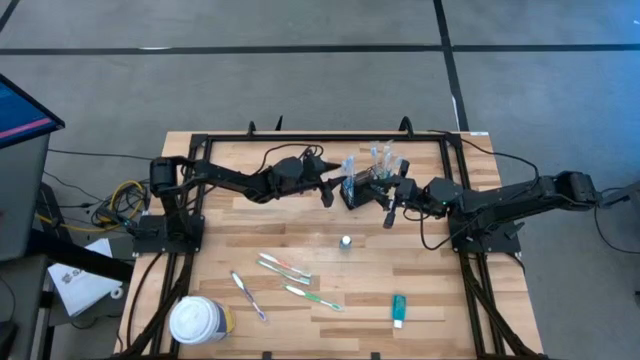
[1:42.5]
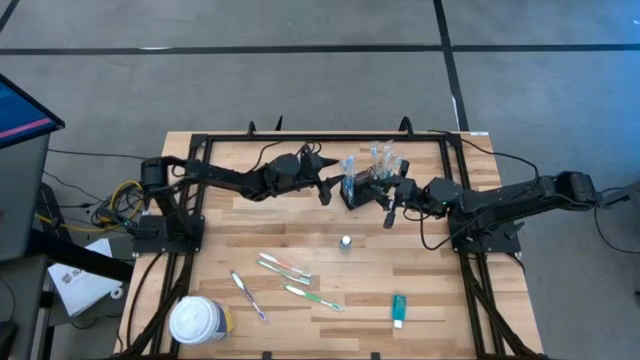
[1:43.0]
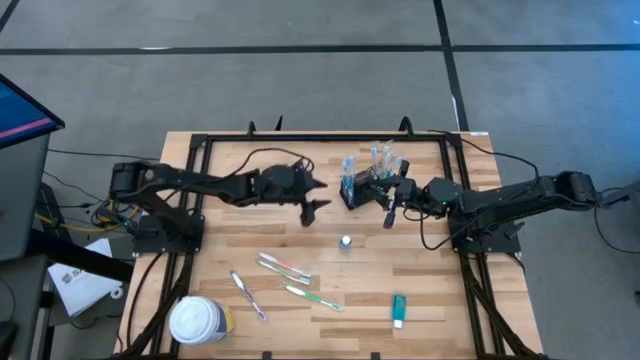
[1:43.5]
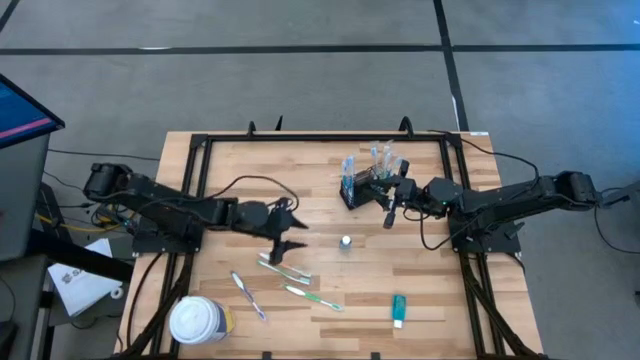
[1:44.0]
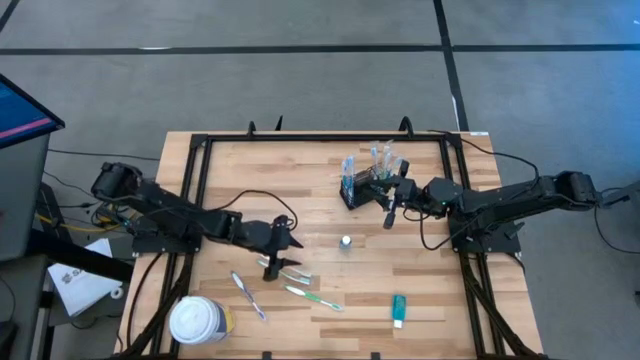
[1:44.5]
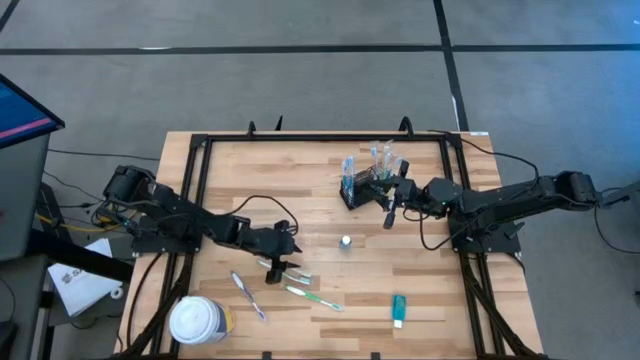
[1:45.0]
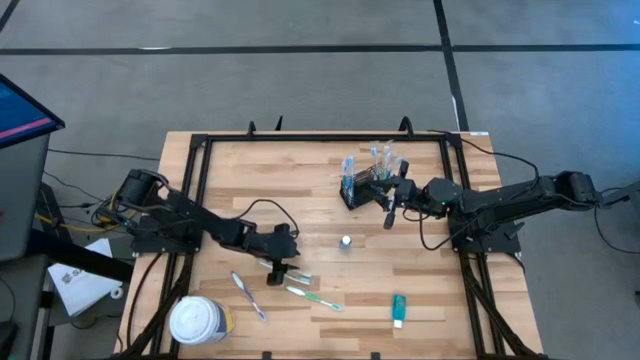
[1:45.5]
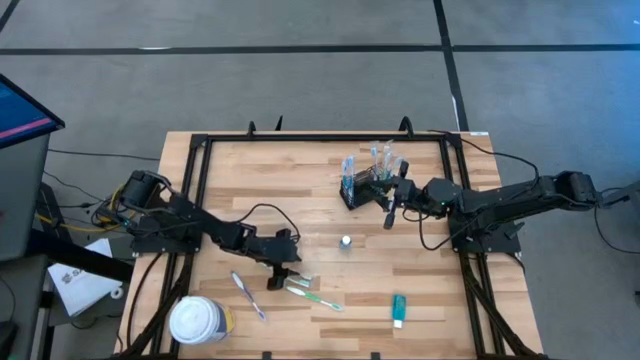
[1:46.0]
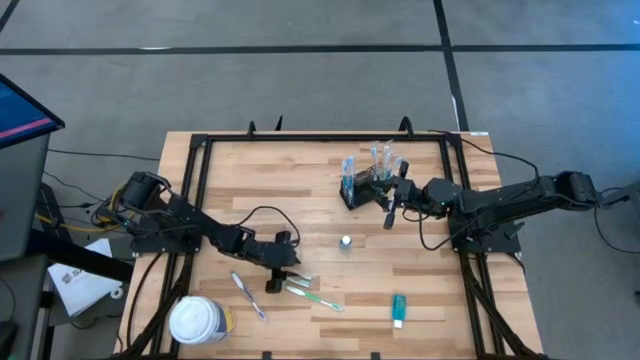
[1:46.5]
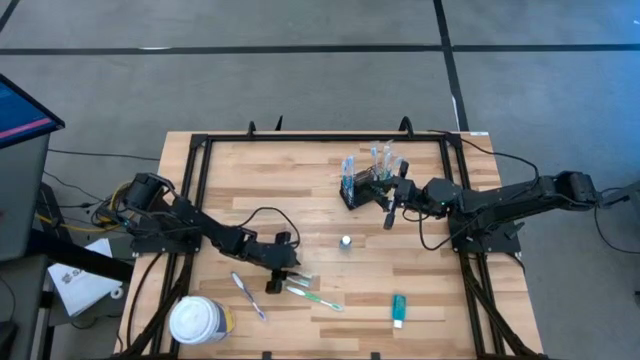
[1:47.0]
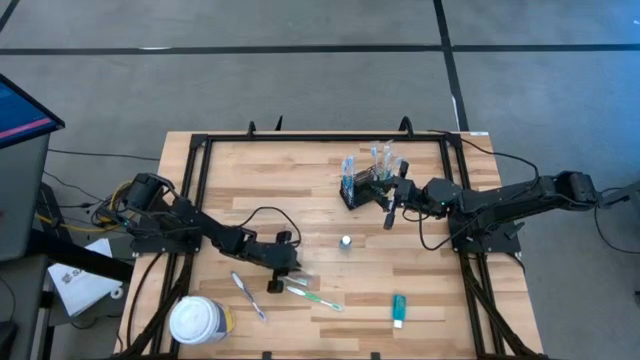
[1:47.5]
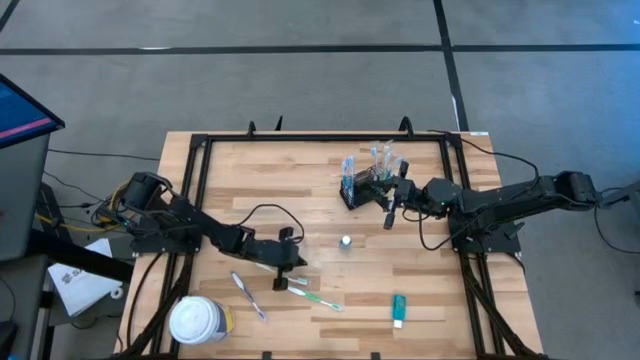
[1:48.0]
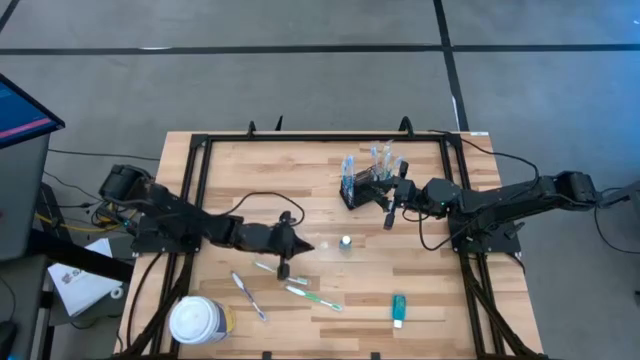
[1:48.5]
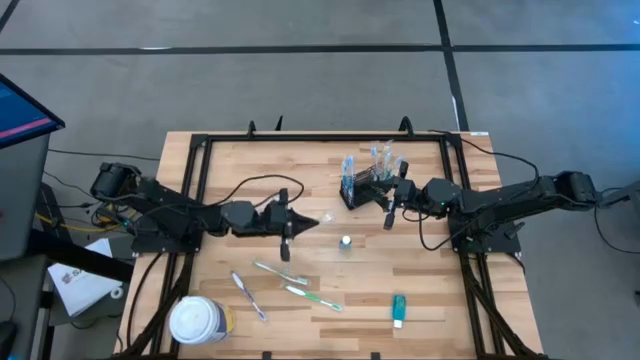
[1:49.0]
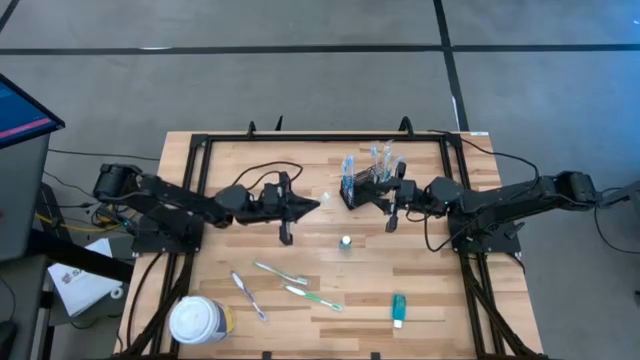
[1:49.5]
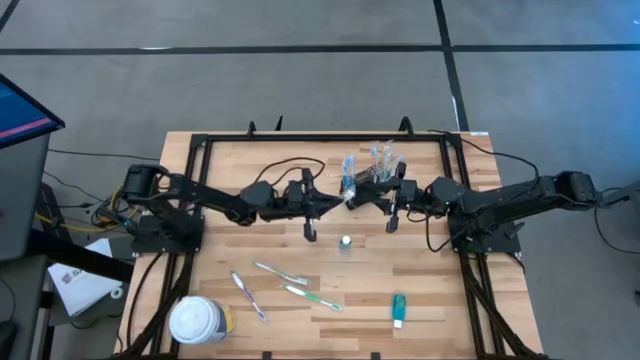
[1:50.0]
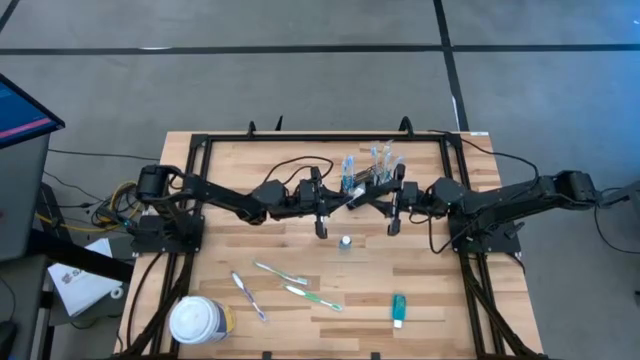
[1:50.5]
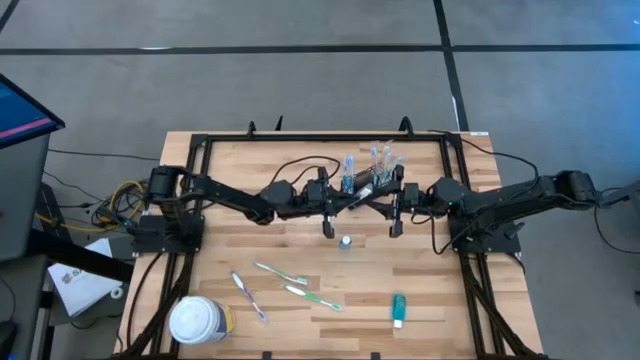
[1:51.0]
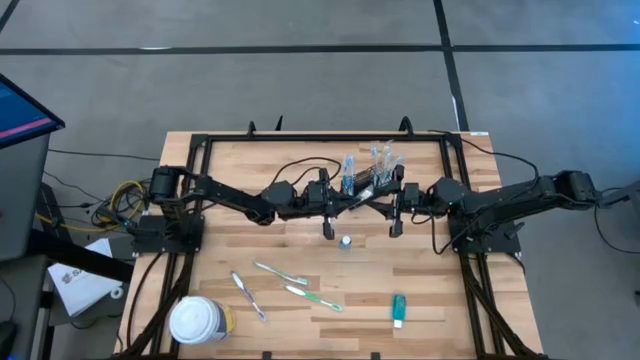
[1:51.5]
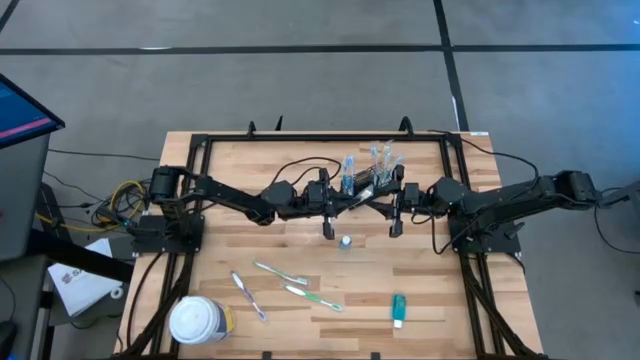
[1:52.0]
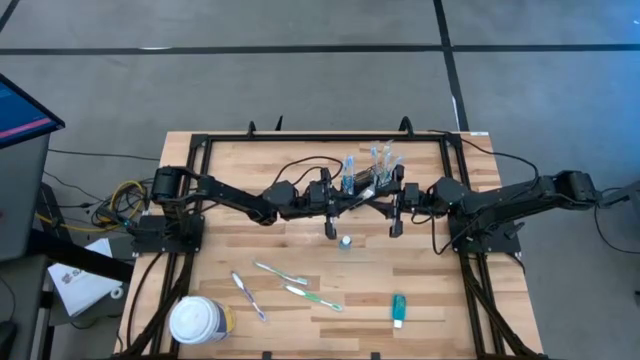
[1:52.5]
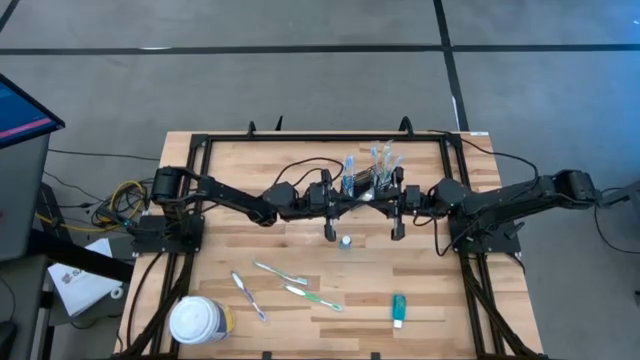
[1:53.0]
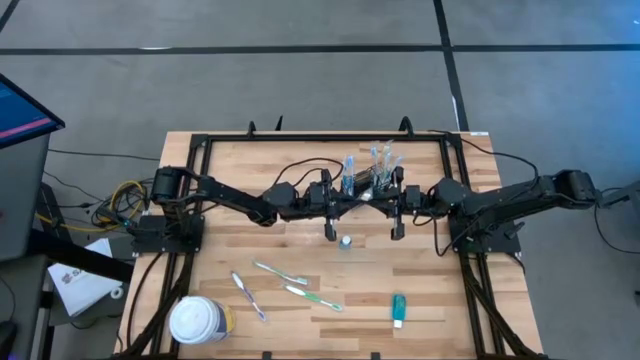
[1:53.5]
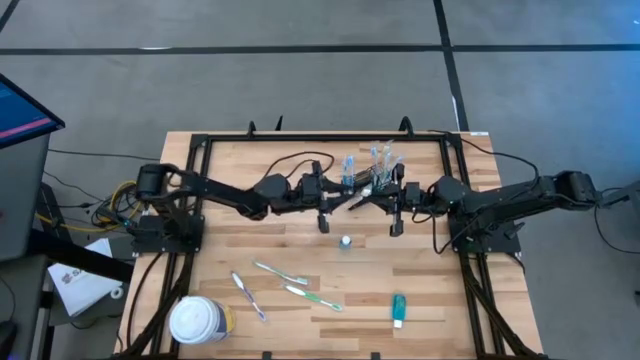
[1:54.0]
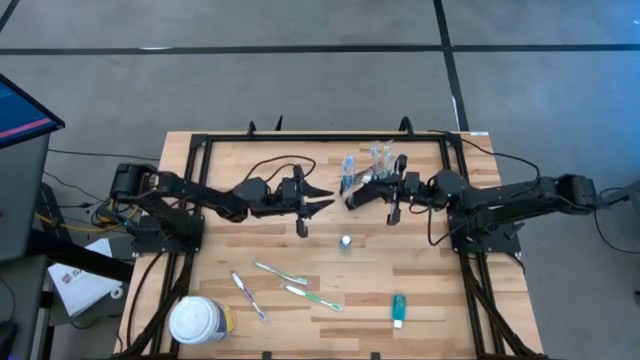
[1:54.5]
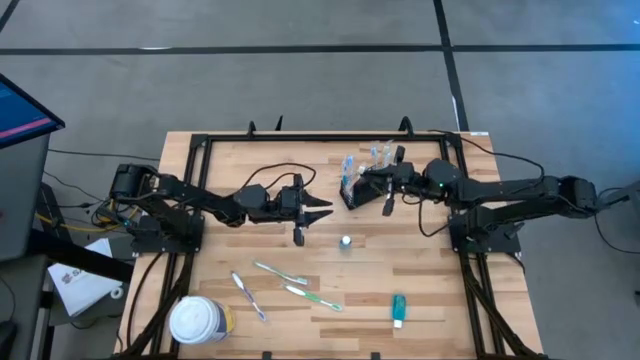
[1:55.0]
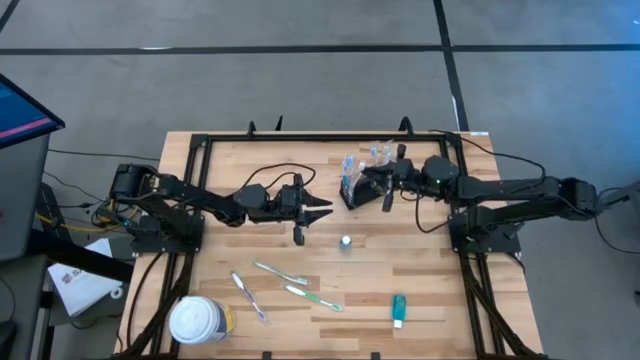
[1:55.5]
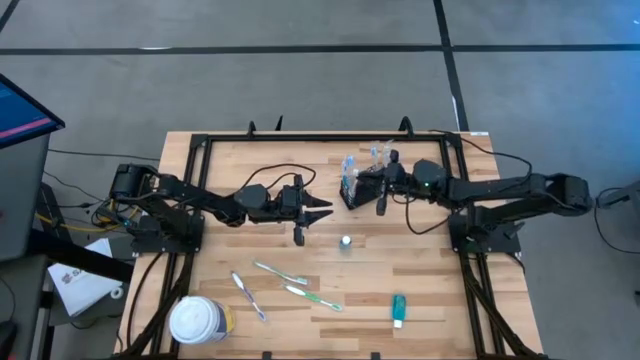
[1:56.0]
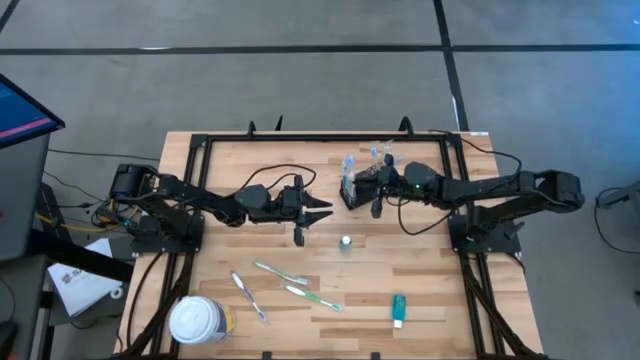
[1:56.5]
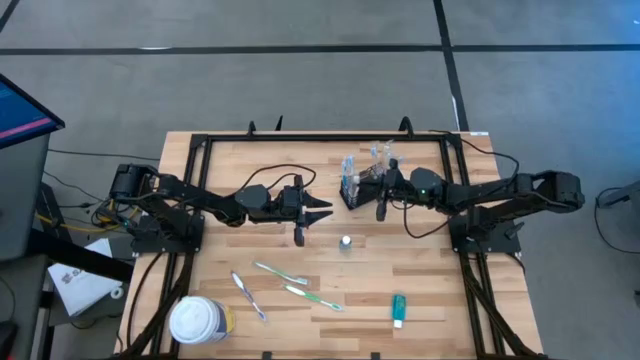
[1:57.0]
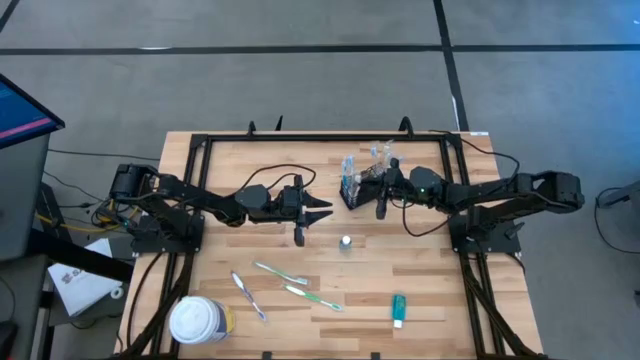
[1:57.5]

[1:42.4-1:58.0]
Task: Pick & Place toothbrushing station
Put the orange toothbrush into the mesh organizer

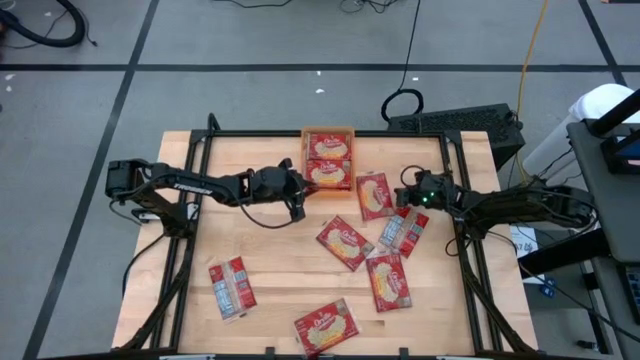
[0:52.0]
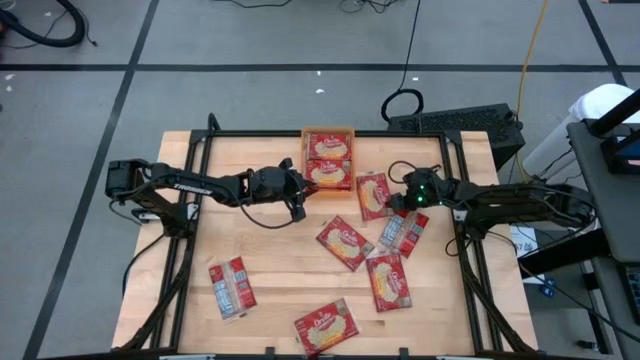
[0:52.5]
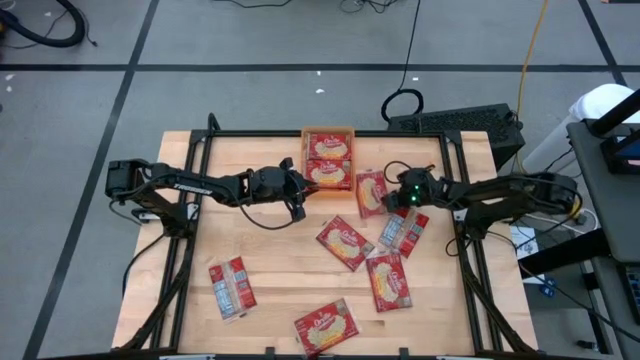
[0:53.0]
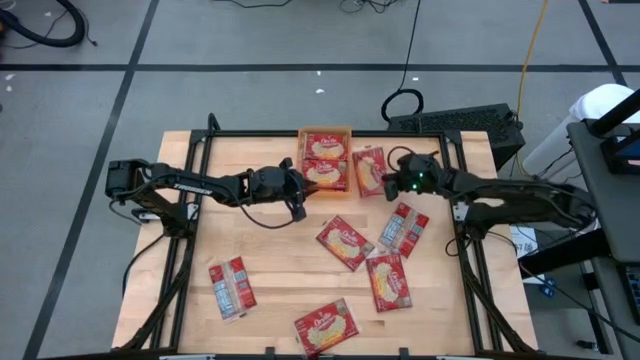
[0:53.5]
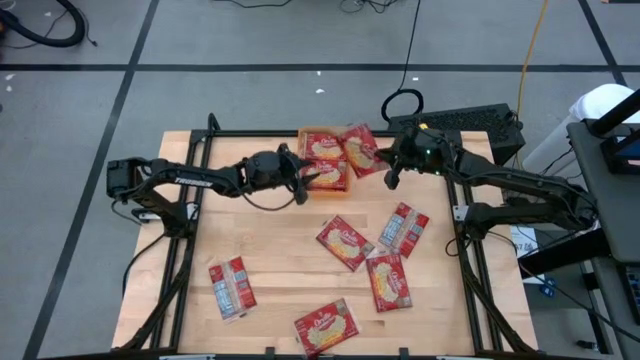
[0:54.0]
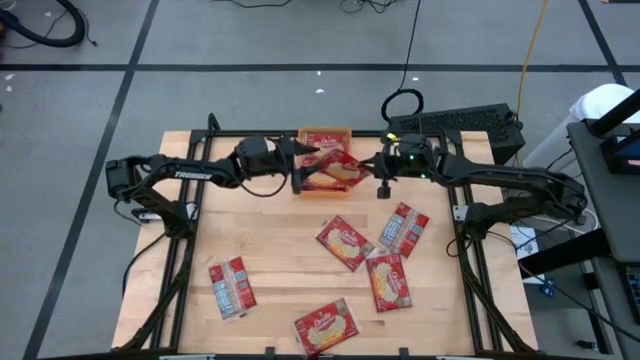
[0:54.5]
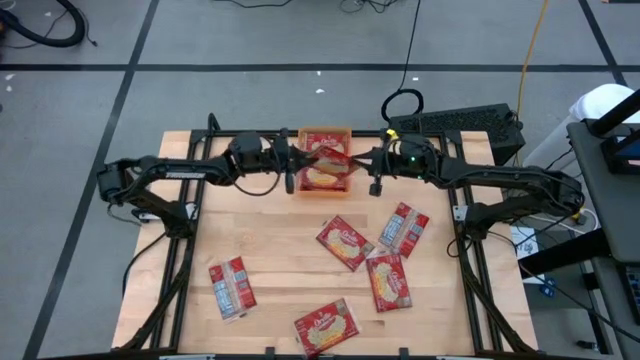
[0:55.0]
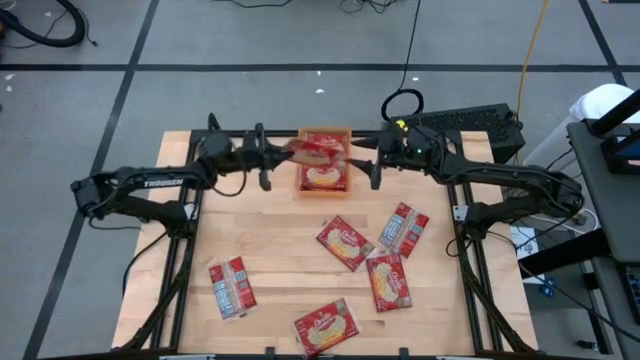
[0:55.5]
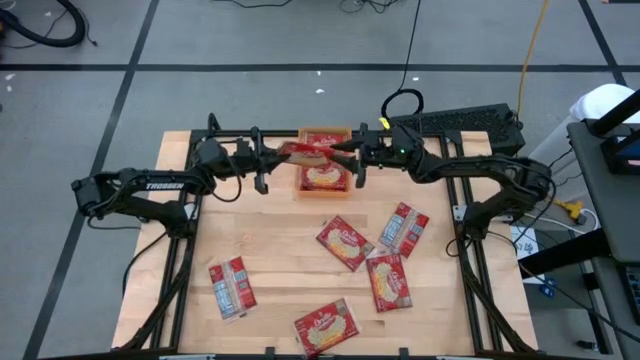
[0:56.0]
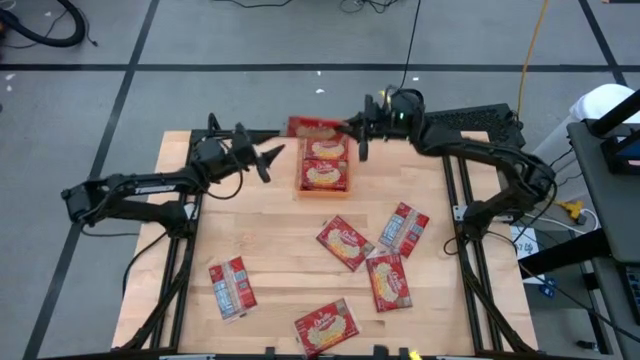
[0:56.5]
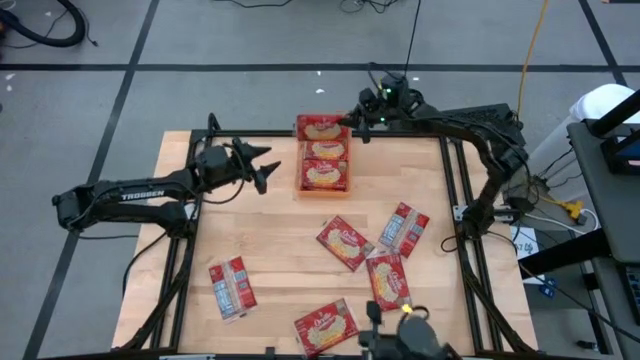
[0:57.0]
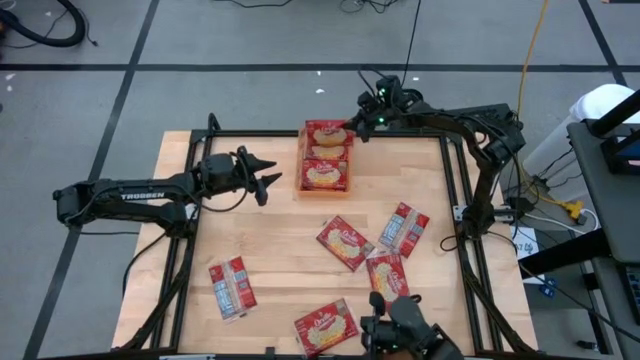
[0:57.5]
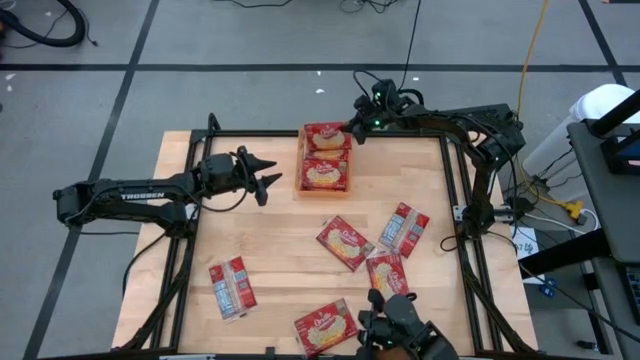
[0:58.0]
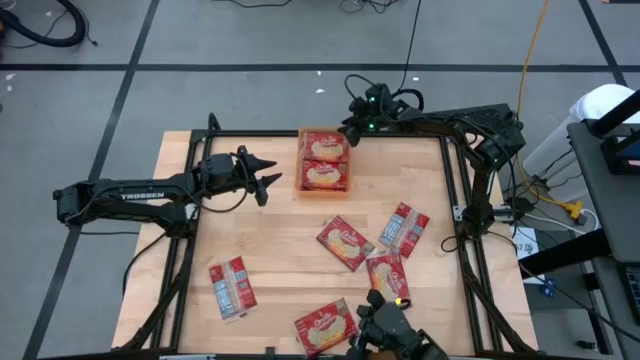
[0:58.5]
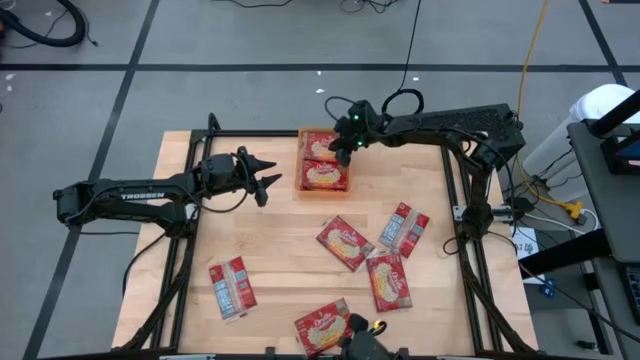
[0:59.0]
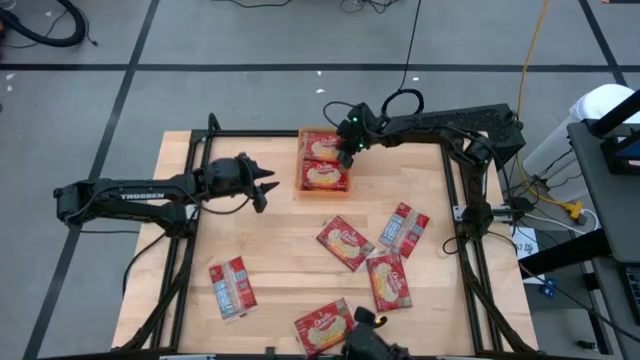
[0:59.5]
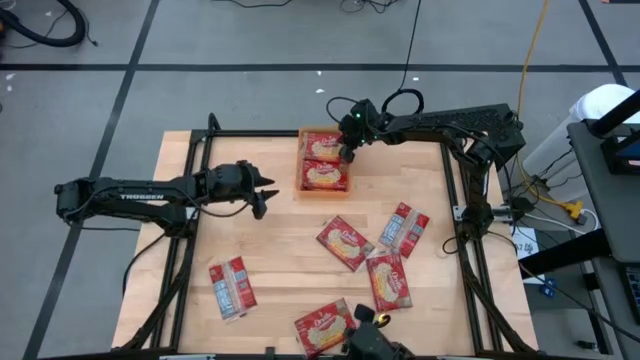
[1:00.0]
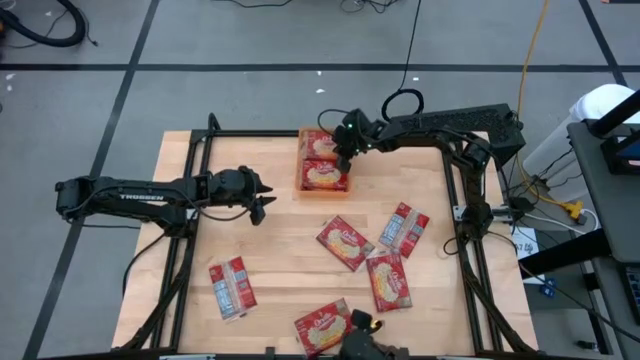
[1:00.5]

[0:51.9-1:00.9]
Task: Sort popcorn bags into baskets
Put the red popcorn bag into the orange bin
